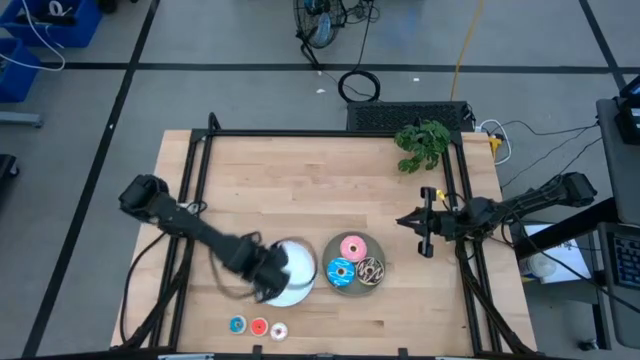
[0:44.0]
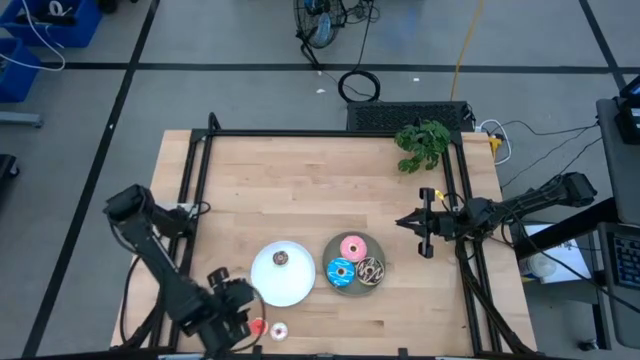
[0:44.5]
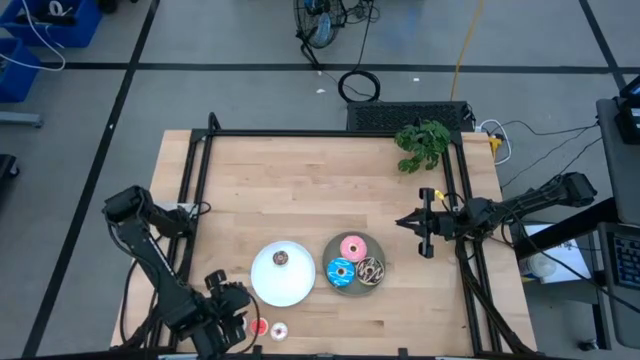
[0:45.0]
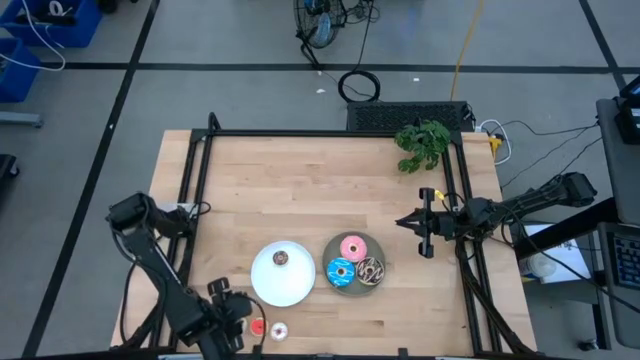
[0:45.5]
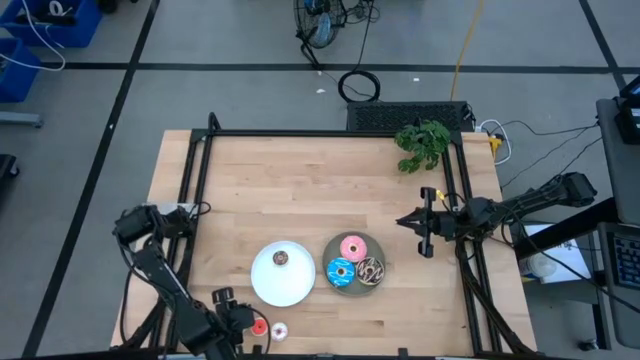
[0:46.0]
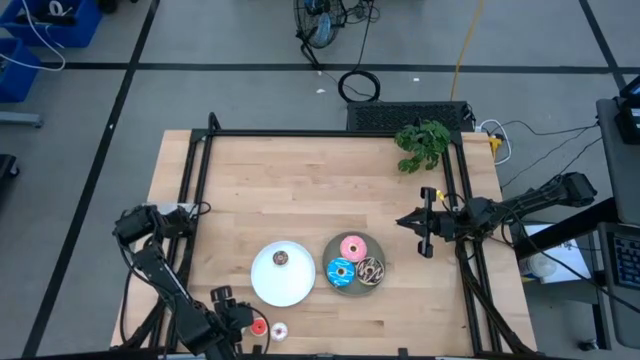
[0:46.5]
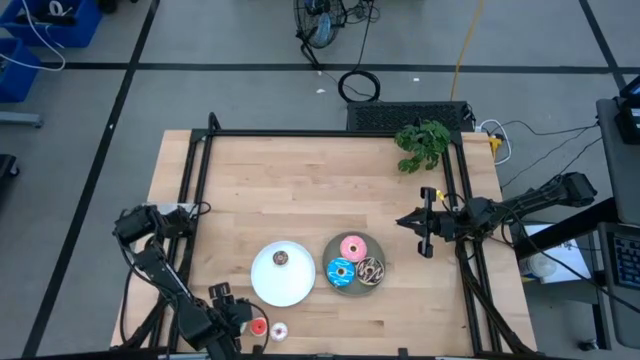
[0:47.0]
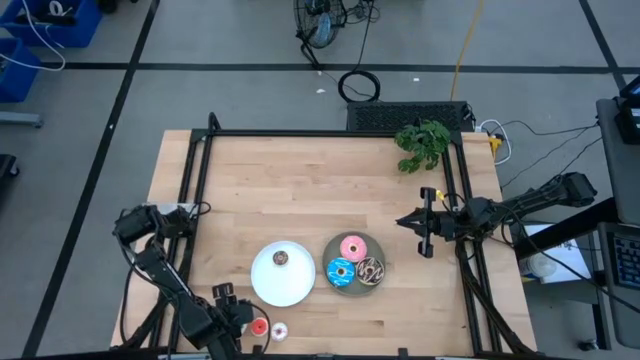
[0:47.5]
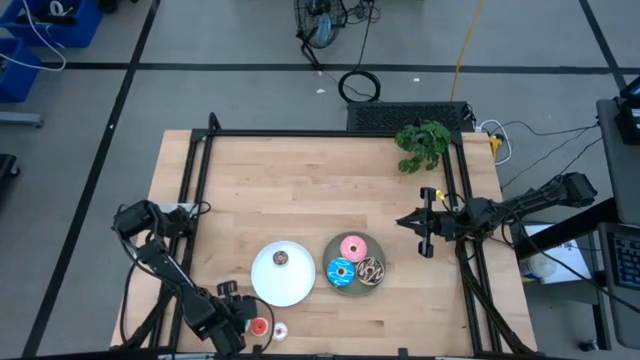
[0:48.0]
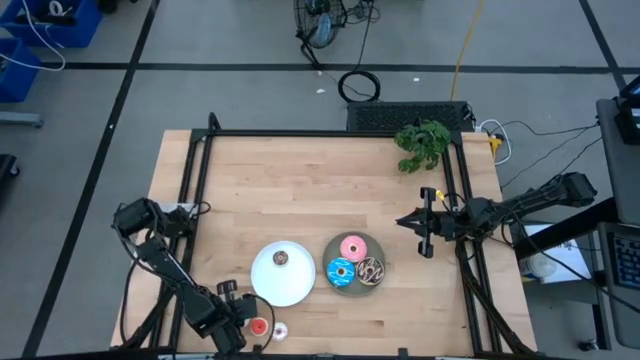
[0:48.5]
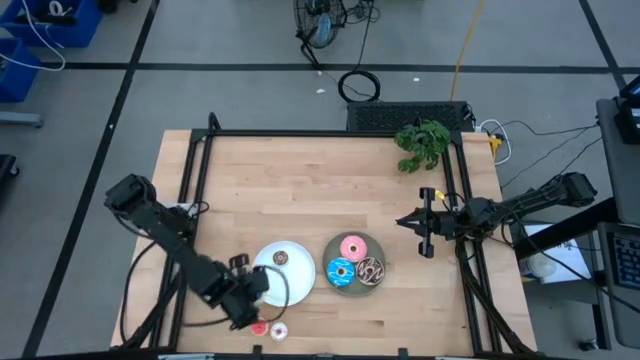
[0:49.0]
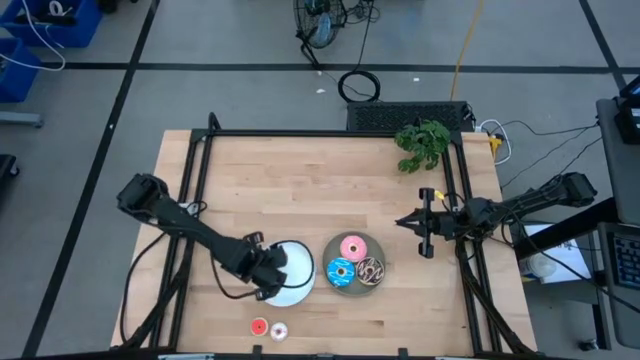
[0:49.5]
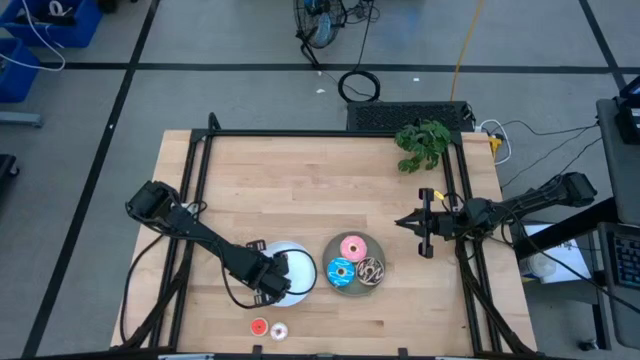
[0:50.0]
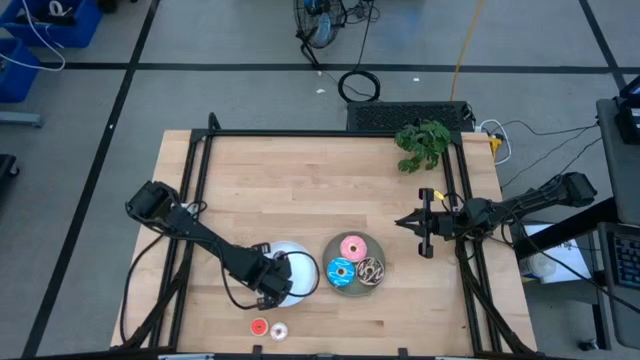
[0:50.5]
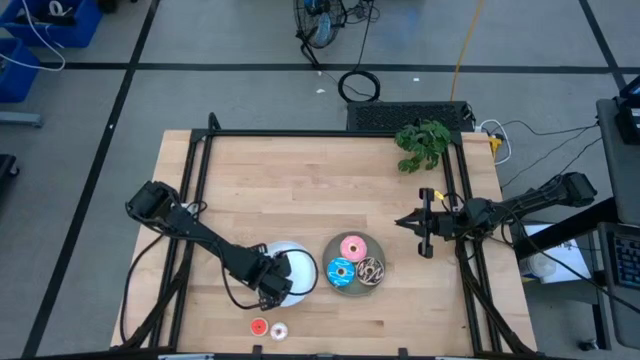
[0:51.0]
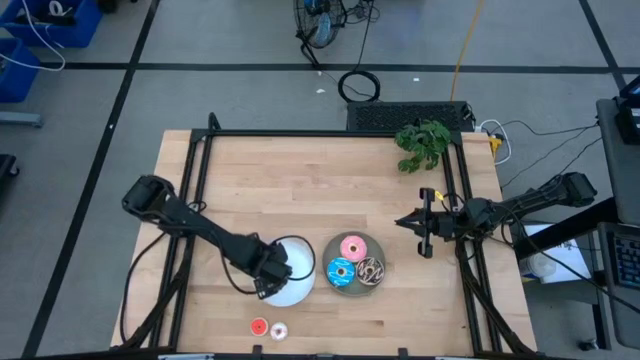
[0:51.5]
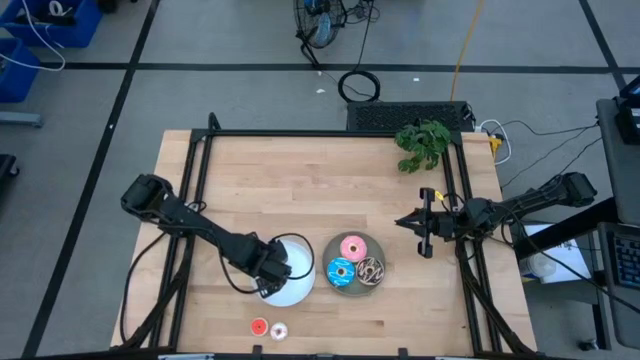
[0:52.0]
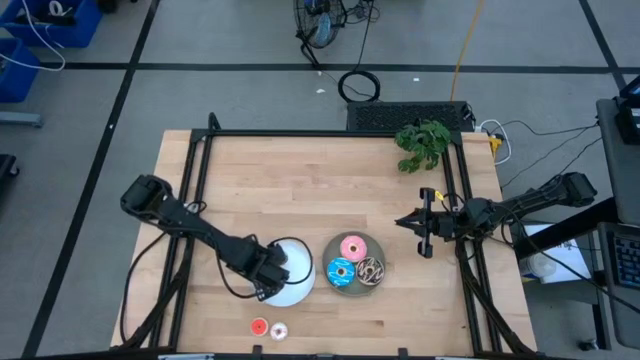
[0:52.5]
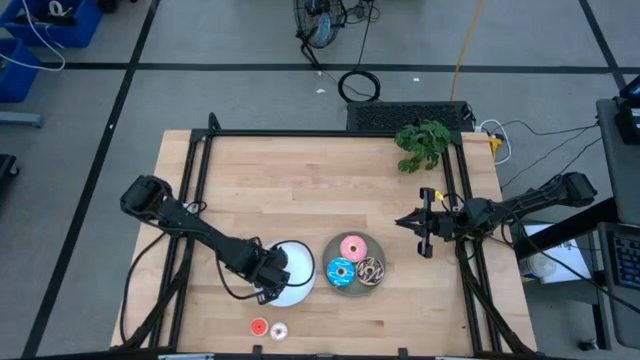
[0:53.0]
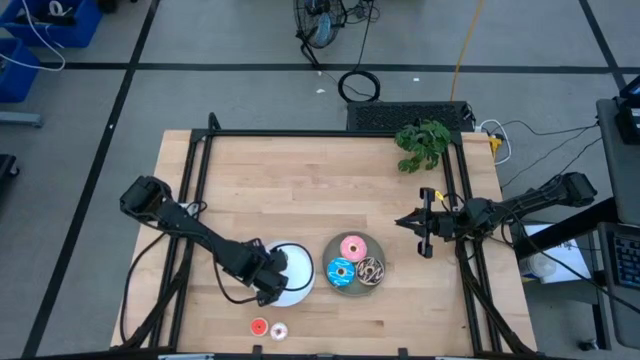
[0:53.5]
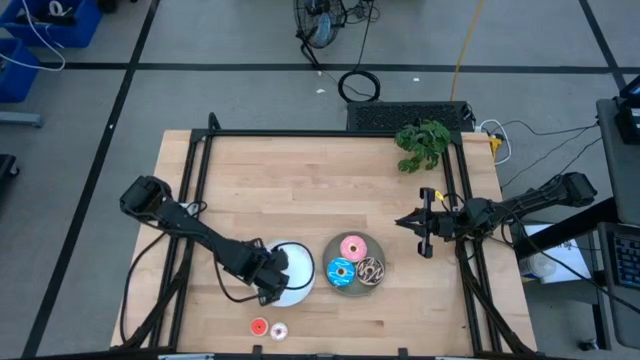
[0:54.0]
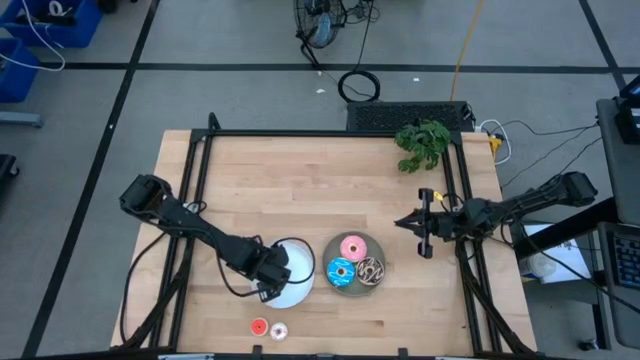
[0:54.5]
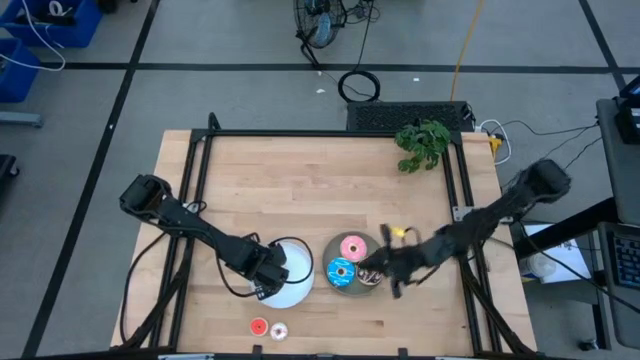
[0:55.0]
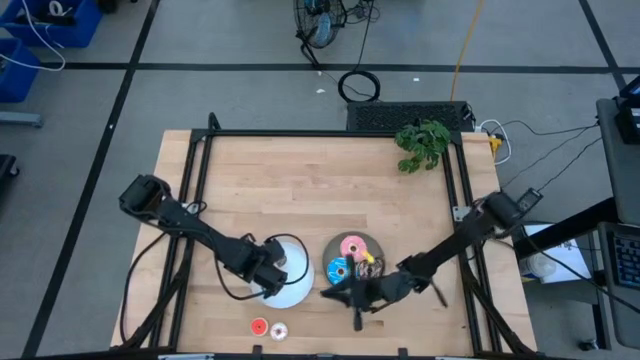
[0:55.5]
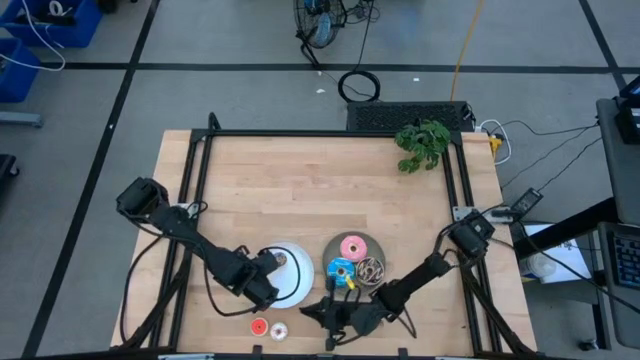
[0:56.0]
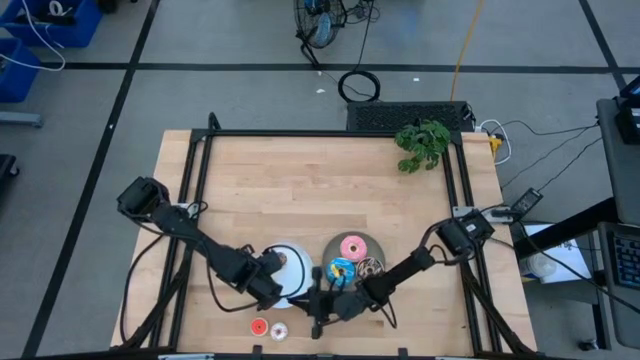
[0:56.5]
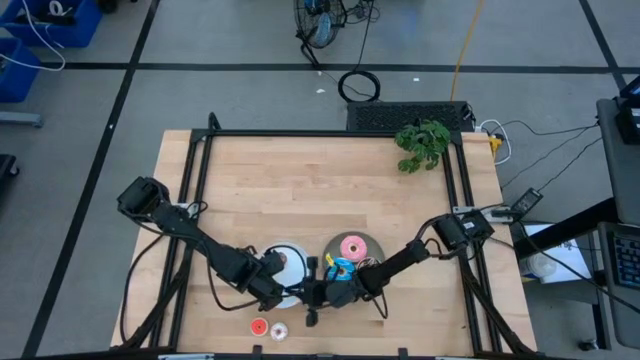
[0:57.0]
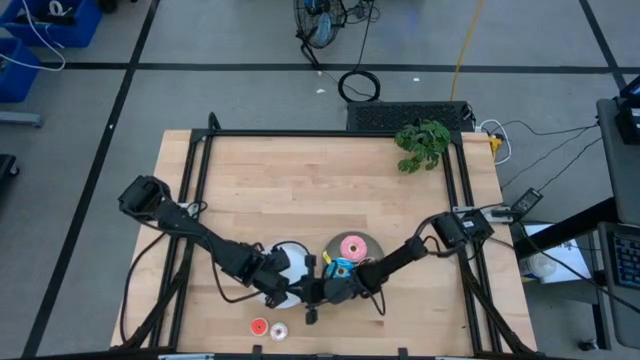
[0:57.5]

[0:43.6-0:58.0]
Task: Pick & Place donuts
Put the small blue donut on the white plate

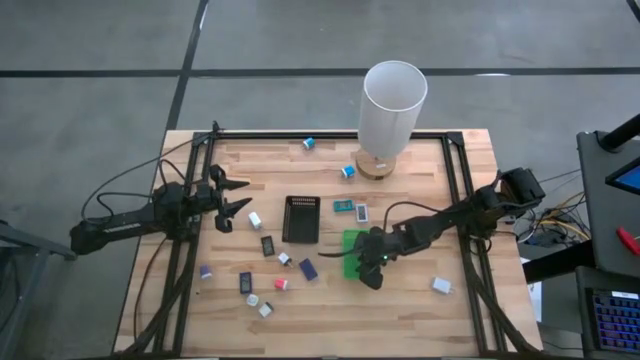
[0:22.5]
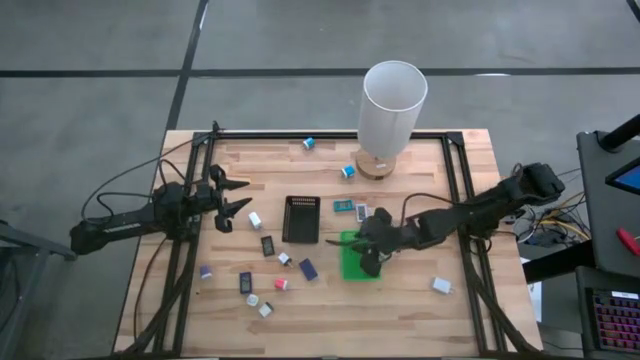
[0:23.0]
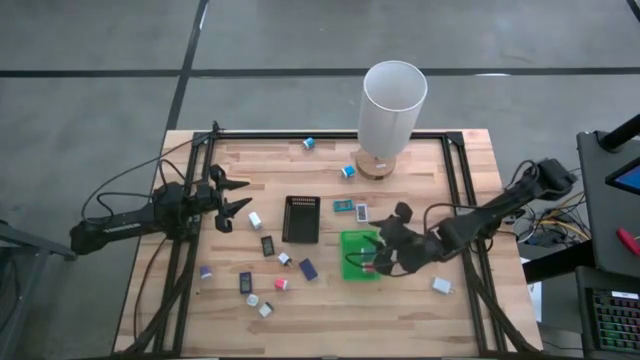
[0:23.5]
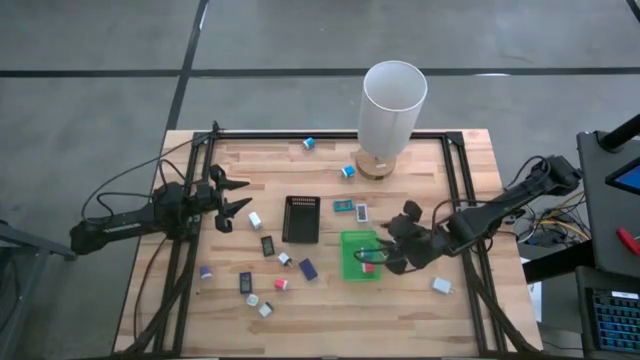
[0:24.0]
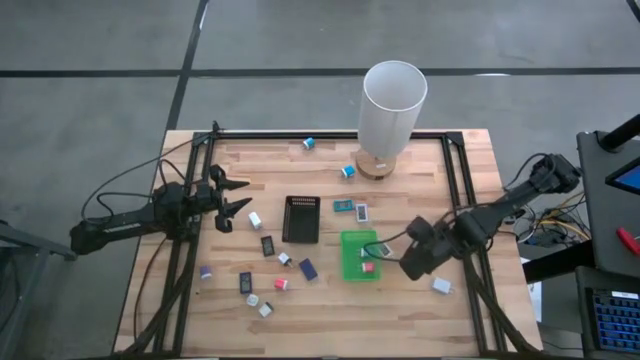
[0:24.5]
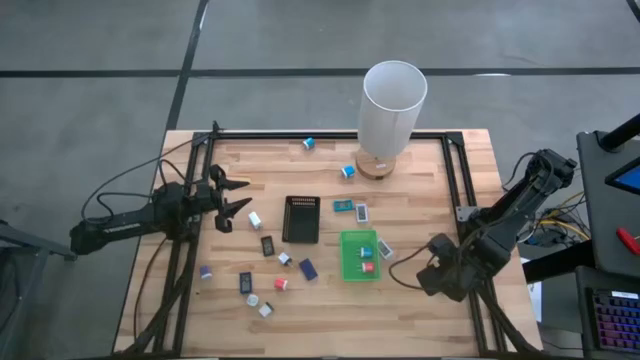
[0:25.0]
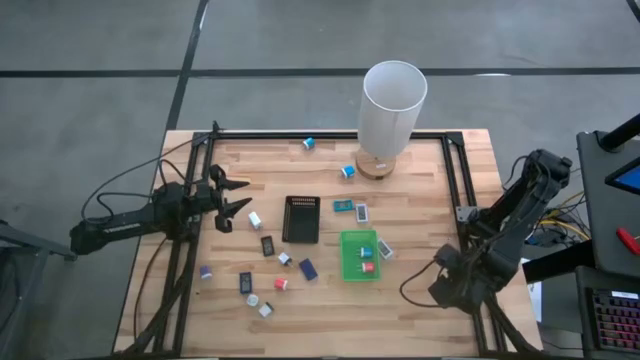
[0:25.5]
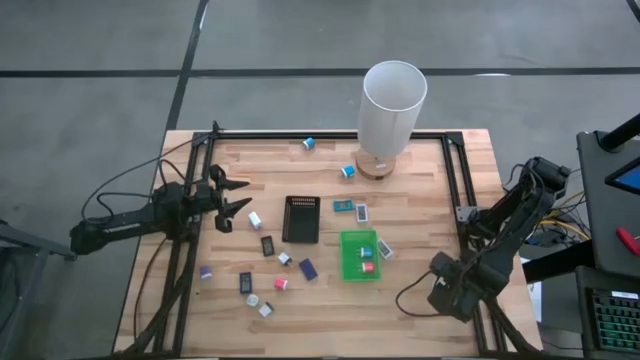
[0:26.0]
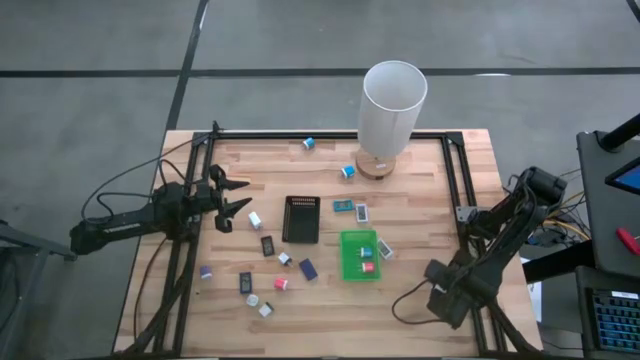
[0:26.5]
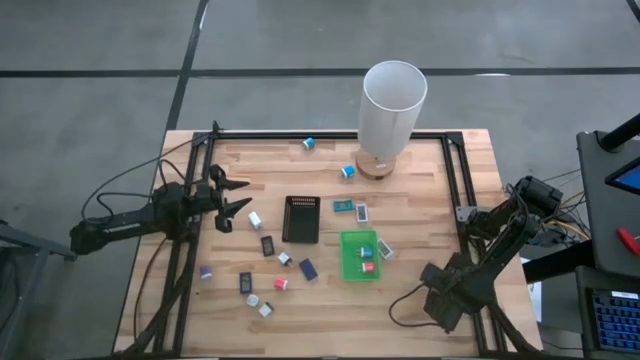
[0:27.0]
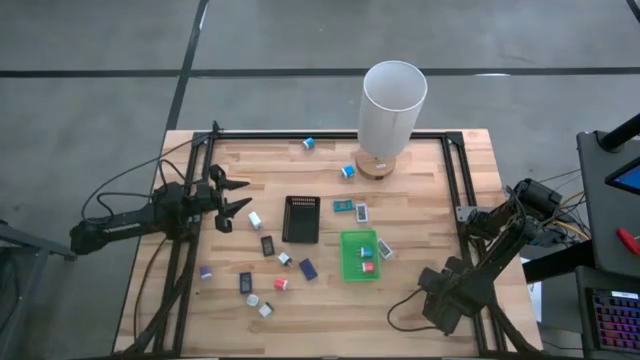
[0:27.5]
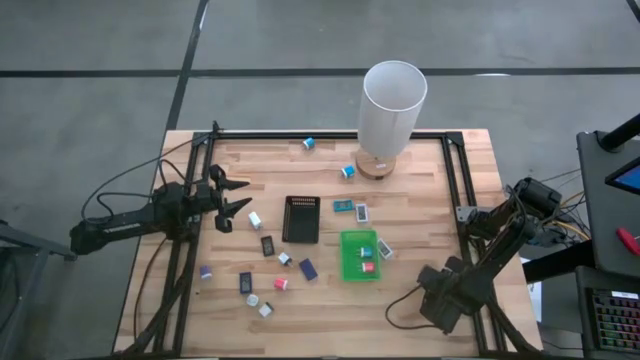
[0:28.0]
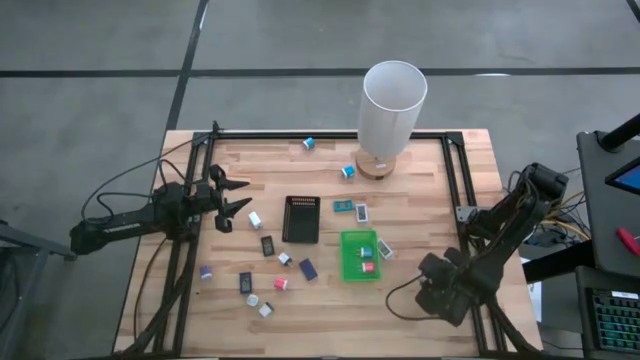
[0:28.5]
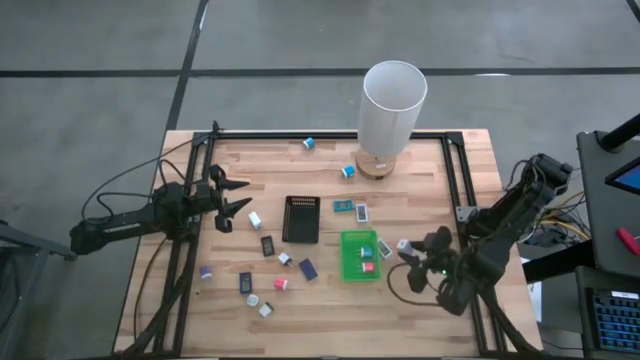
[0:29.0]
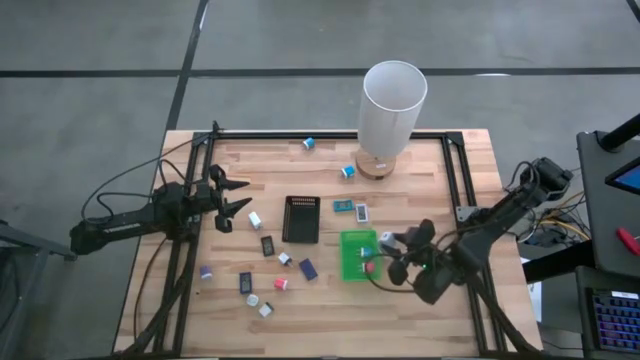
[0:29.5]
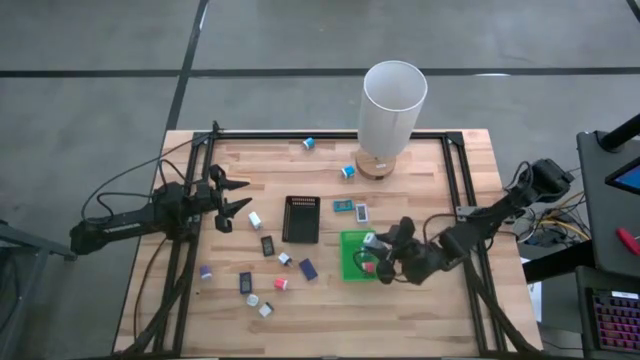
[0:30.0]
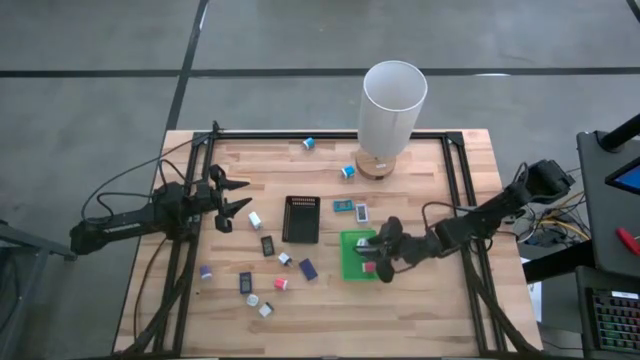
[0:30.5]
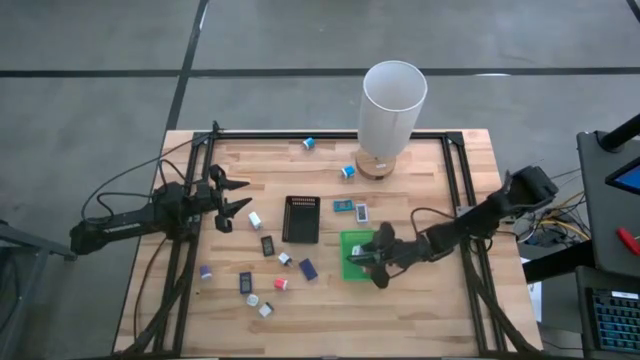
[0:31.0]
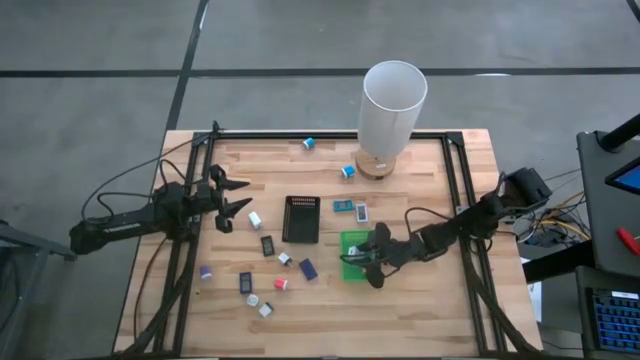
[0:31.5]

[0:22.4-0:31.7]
Task: Pick & Place Office items
Put the right white charger adapter into the green bin
